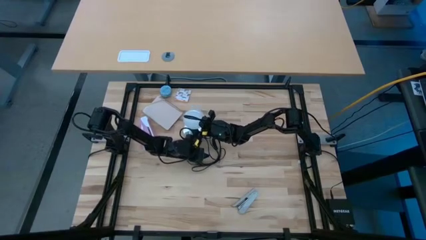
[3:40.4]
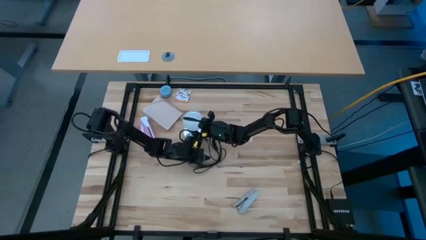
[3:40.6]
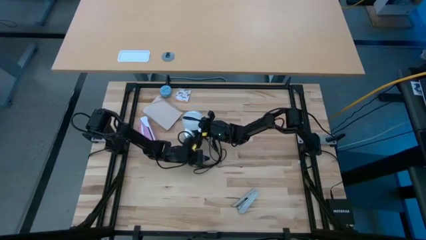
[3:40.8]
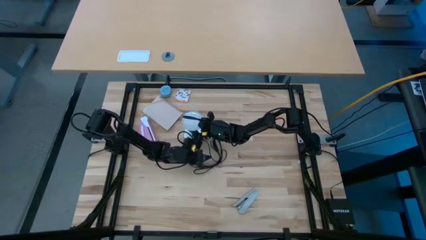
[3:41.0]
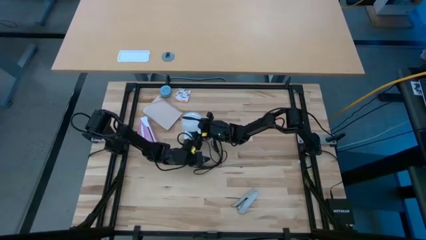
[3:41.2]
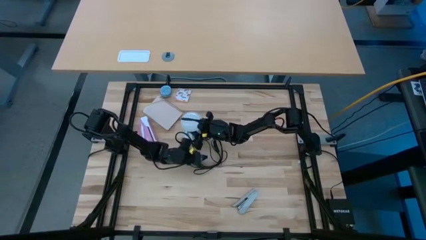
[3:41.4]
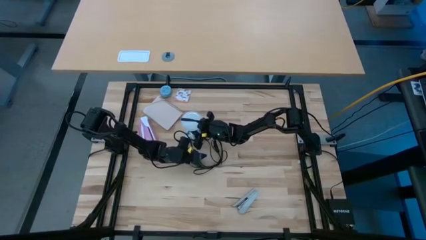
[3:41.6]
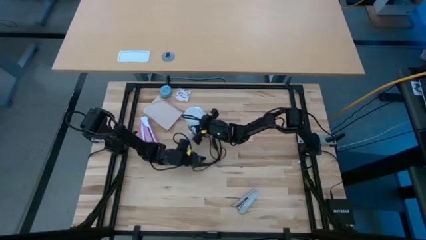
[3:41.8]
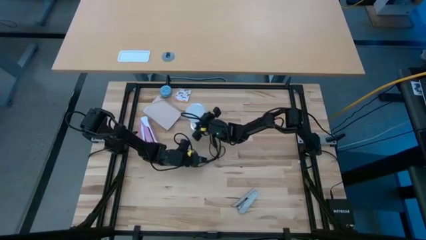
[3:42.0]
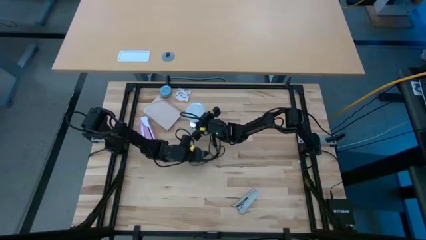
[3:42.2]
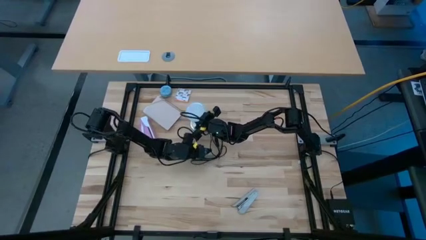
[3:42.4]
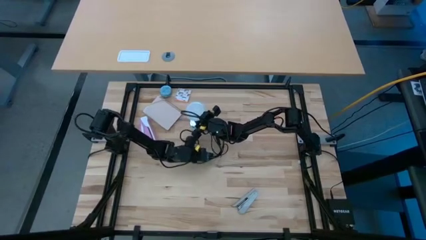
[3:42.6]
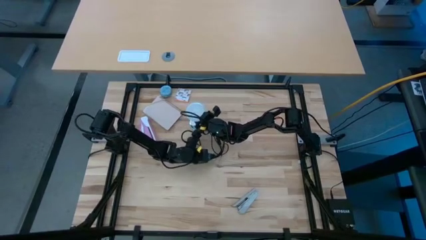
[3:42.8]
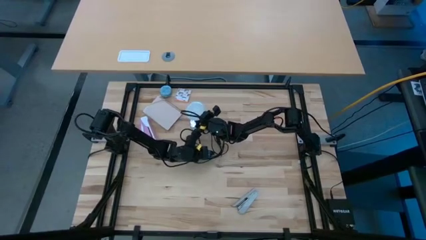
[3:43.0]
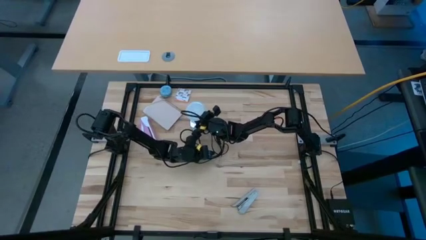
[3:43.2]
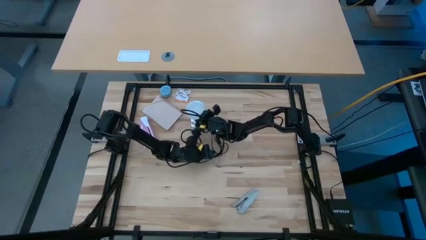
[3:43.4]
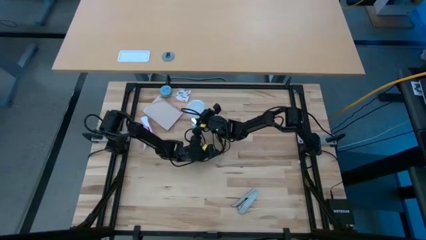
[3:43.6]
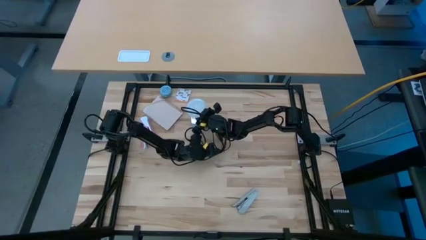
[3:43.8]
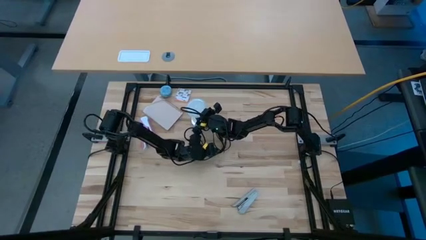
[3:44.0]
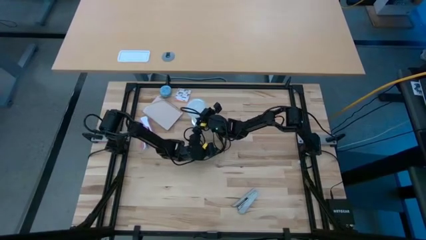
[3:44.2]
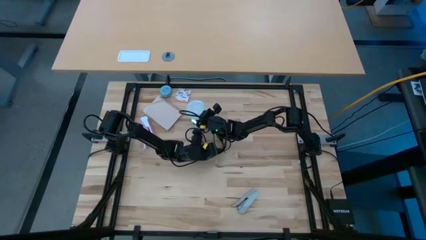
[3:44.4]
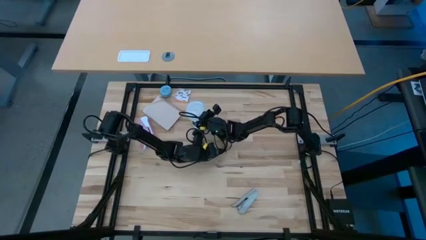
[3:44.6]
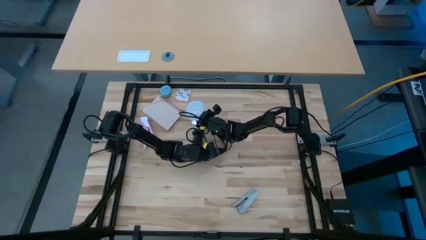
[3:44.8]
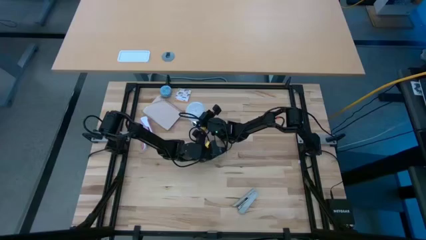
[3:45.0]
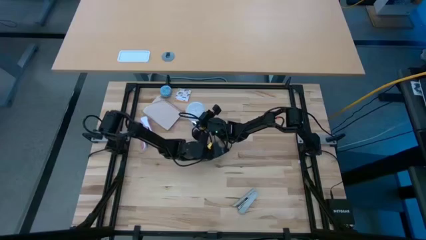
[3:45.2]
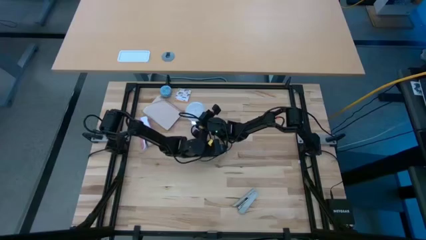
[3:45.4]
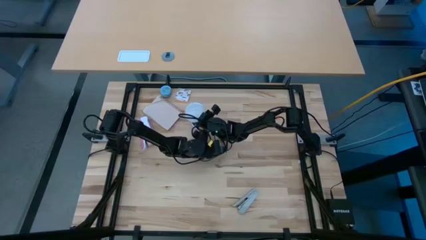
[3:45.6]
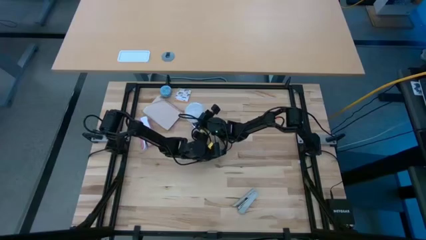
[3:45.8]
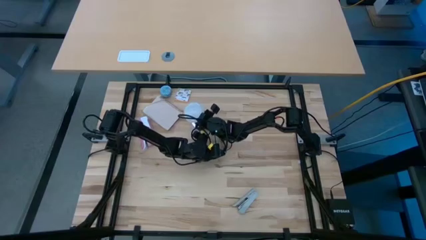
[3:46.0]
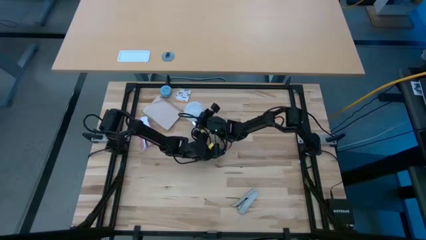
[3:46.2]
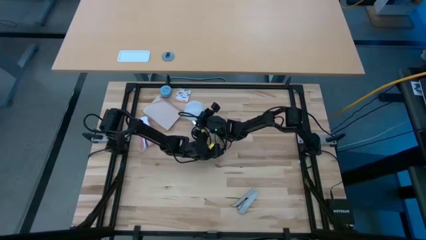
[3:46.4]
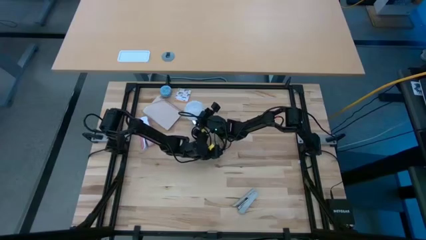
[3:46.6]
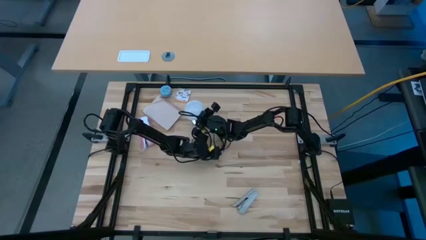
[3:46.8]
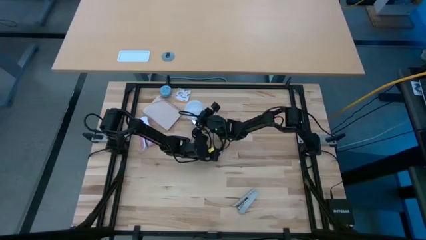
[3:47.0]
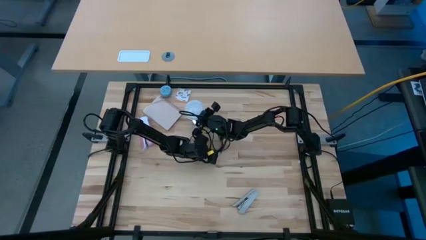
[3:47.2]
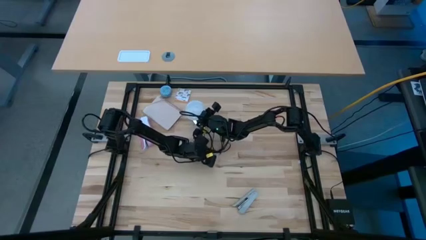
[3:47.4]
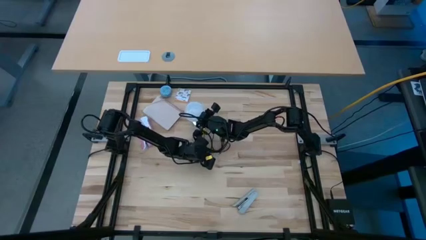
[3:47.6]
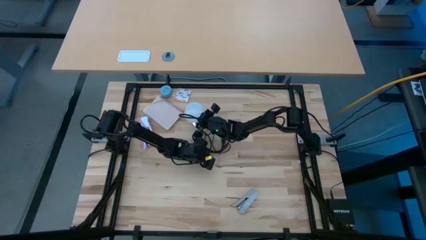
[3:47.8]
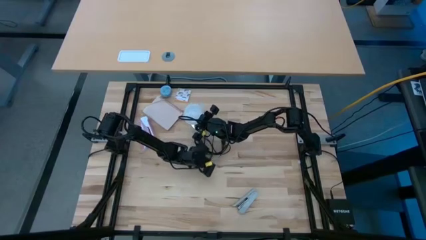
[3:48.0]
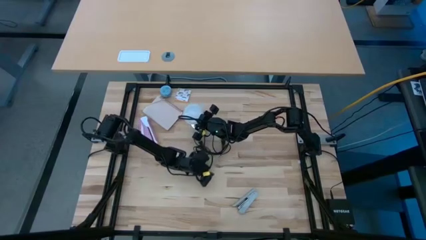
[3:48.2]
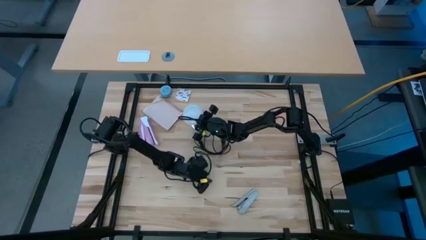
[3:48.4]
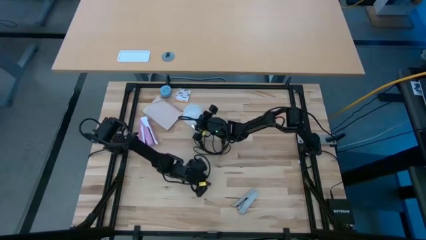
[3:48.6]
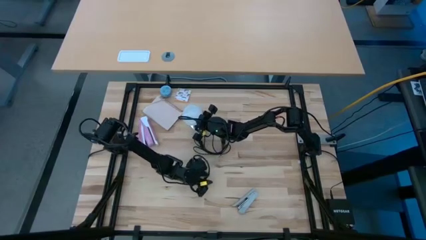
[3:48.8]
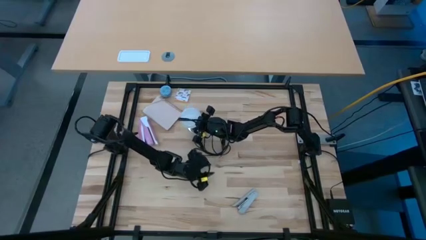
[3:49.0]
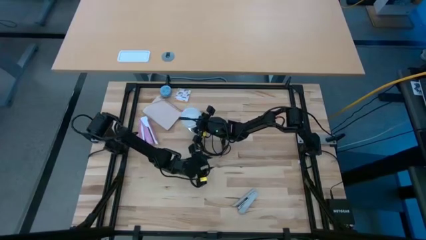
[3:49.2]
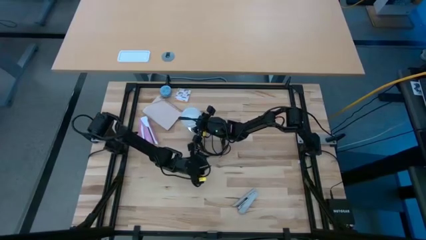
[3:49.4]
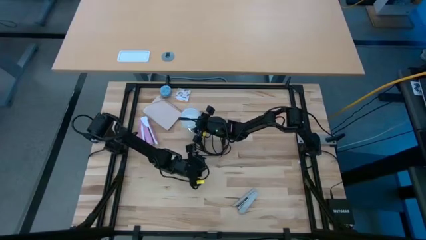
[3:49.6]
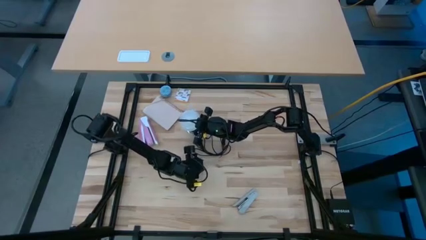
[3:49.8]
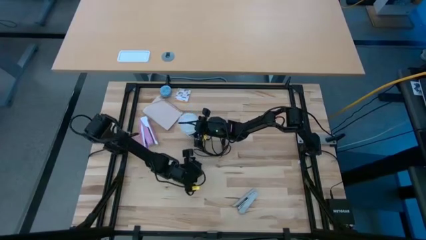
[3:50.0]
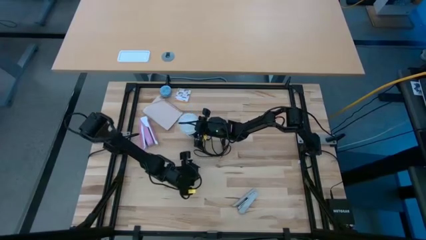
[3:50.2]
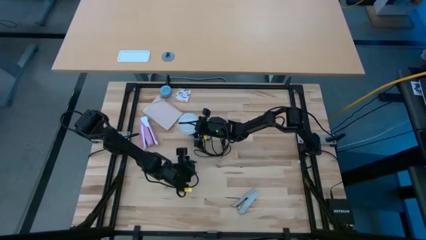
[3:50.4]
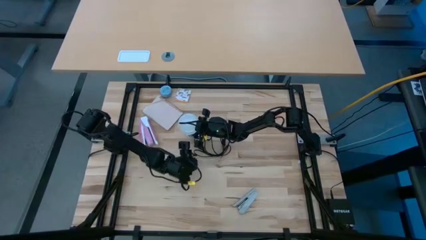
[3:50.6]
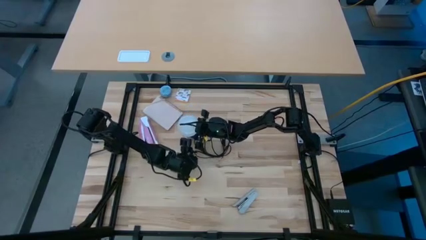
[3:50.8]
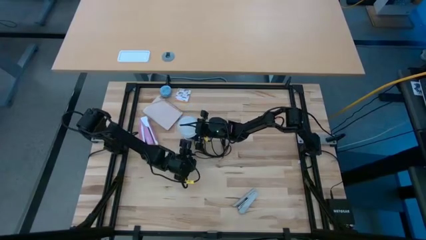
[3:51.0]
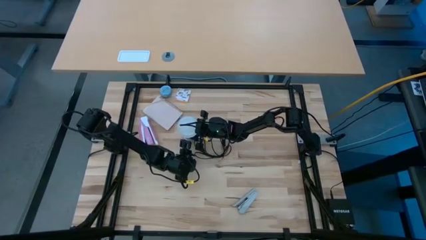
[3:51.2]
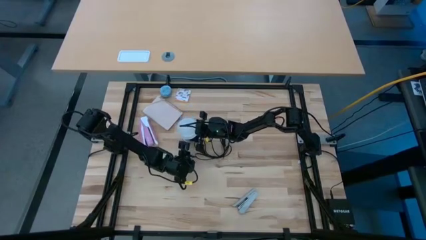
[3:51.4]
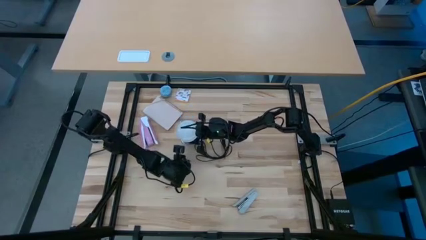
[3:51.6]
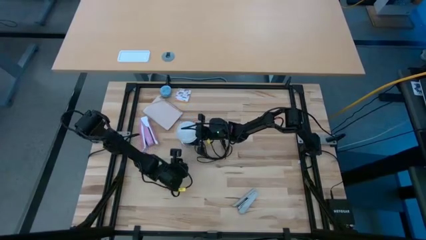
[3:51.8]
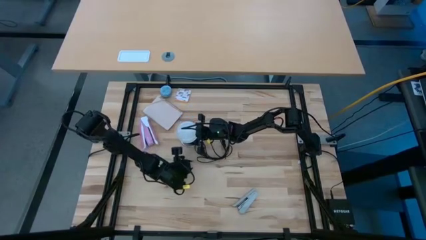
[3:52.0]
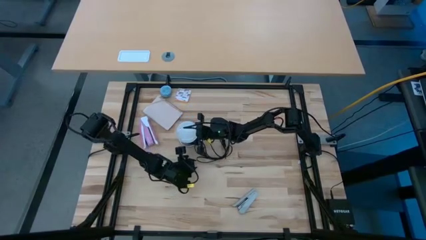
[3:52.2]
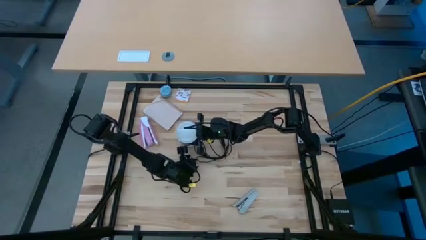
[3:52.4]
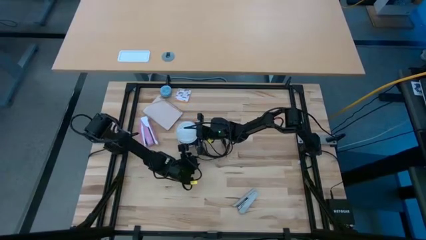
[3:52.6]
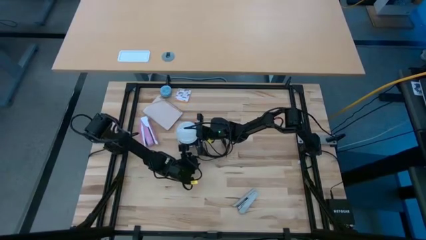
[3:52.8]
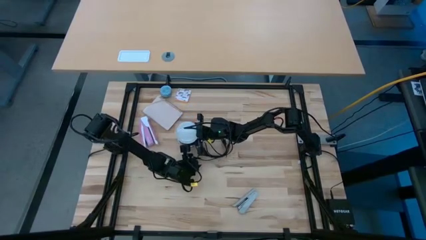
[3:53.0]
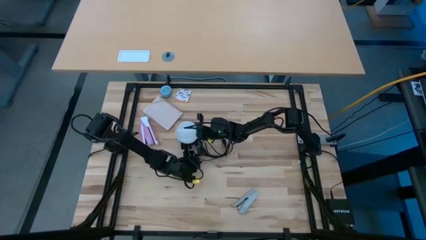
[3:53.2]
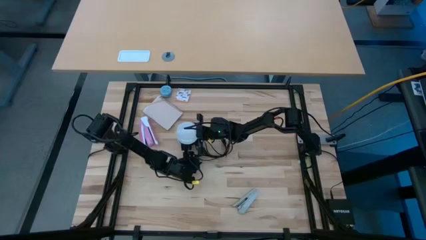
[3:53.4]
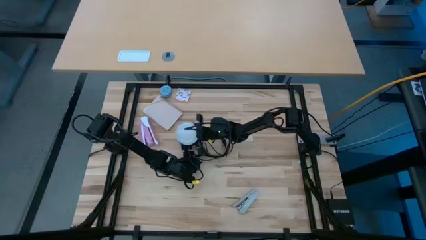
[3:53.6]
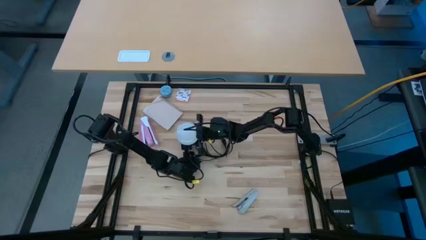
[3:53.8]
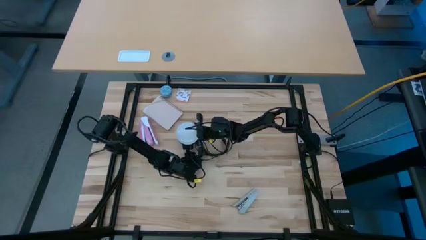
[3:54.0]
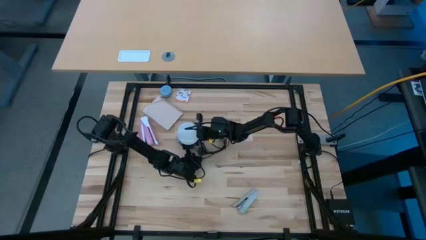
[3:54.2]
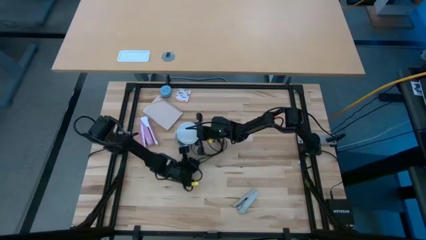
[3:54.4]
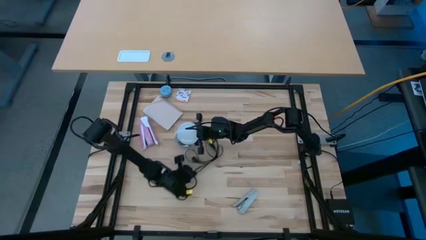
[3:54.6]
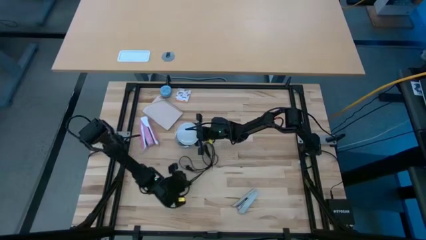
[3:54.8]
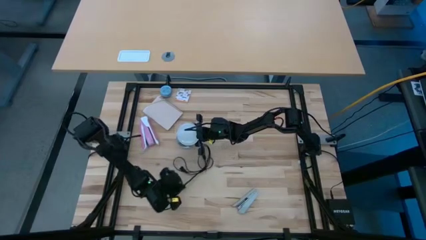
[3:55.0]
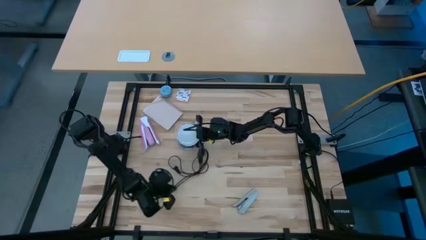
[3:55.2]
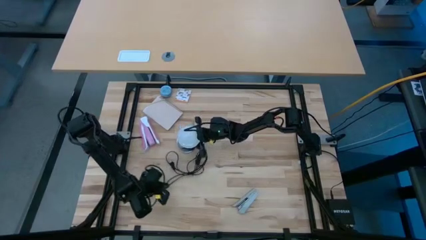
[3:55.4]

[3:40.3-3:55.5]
Task: Screw lightbulb
Remove the lightbulb from the lamp
